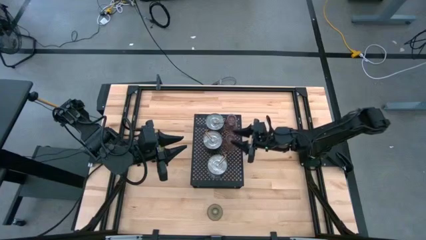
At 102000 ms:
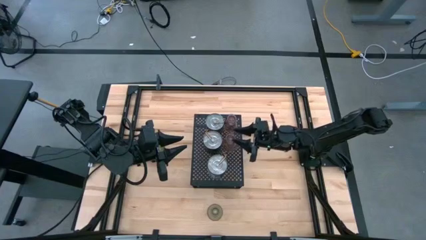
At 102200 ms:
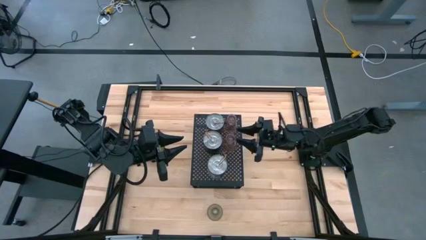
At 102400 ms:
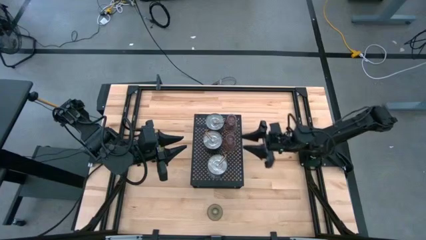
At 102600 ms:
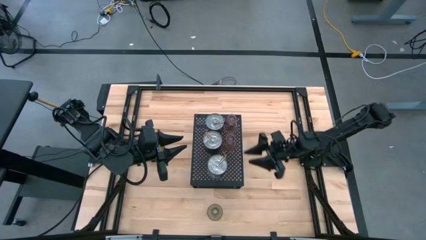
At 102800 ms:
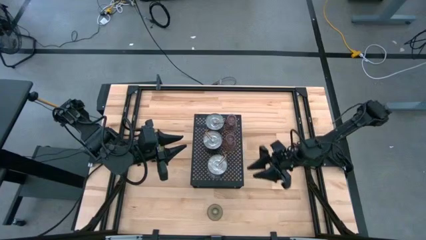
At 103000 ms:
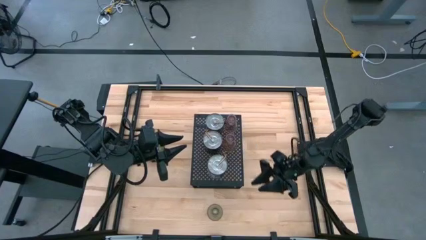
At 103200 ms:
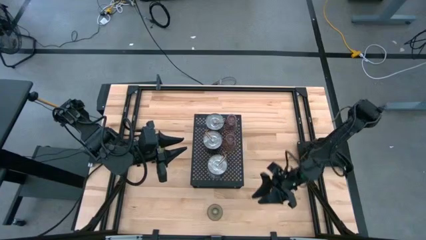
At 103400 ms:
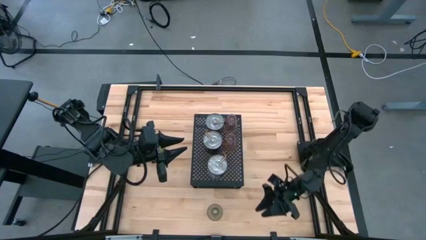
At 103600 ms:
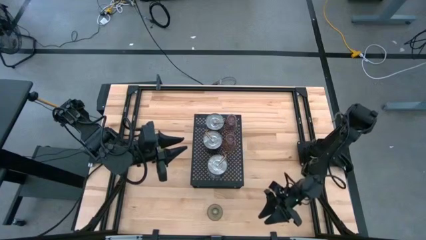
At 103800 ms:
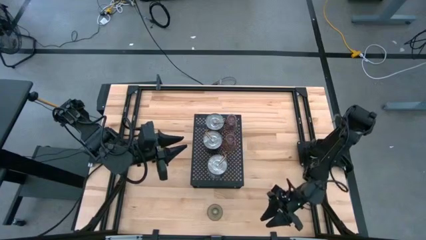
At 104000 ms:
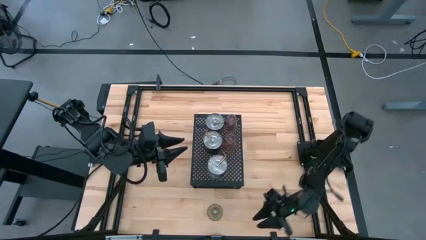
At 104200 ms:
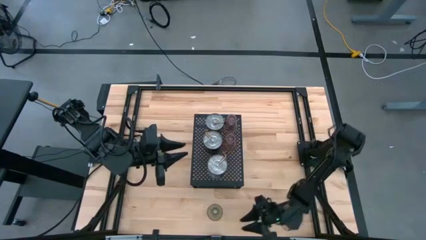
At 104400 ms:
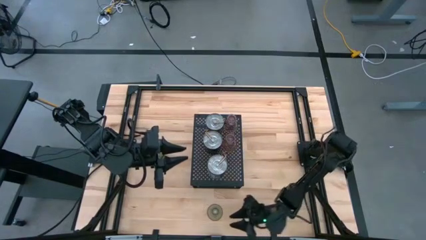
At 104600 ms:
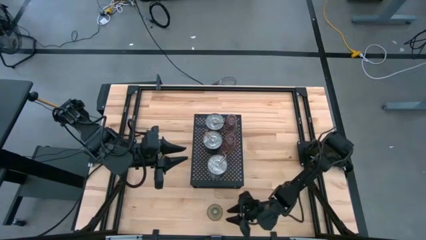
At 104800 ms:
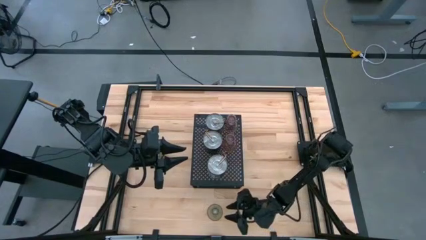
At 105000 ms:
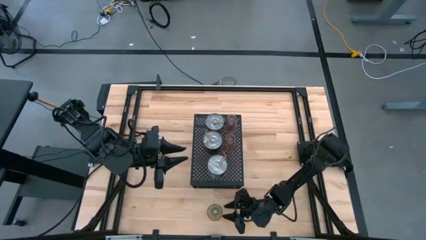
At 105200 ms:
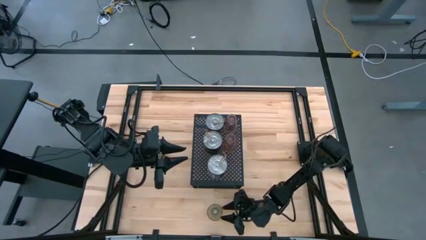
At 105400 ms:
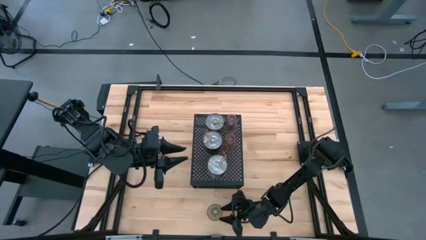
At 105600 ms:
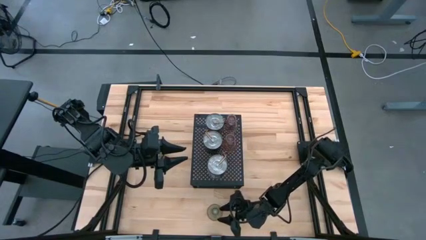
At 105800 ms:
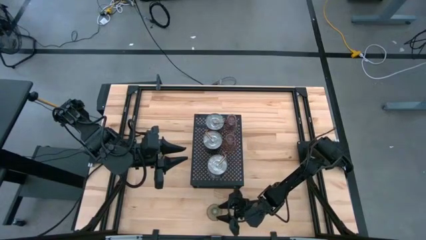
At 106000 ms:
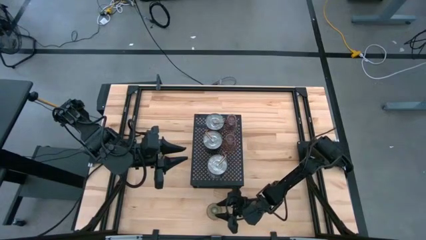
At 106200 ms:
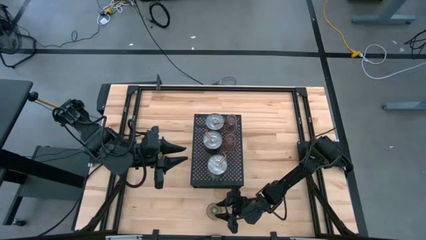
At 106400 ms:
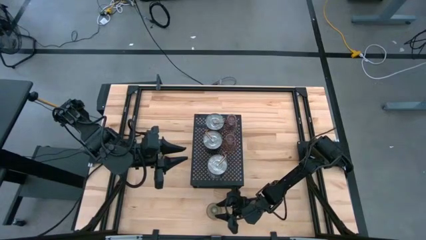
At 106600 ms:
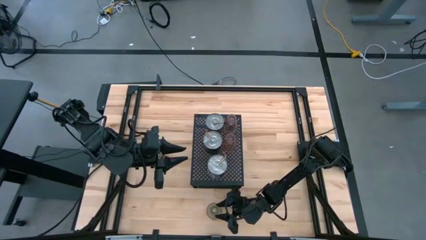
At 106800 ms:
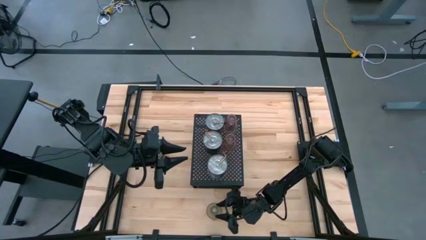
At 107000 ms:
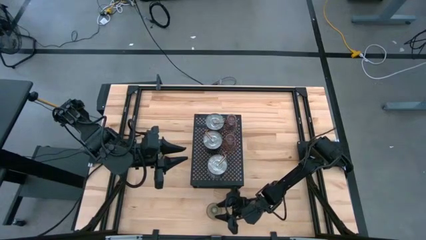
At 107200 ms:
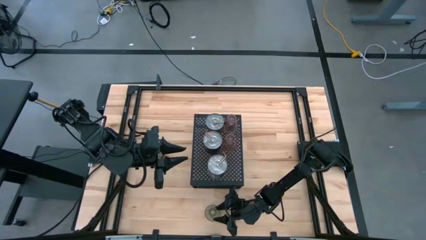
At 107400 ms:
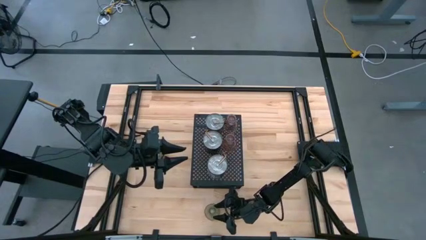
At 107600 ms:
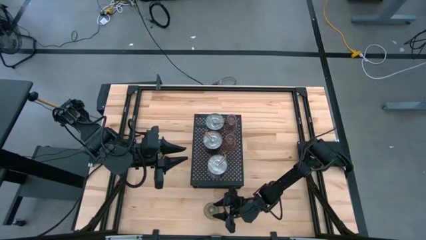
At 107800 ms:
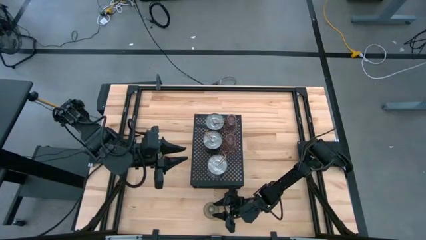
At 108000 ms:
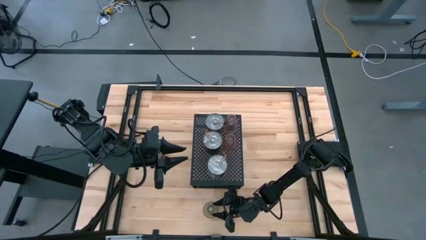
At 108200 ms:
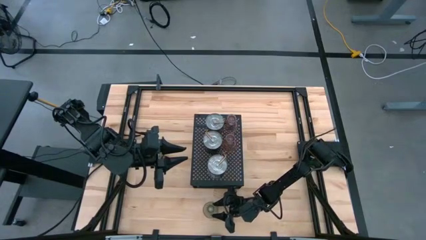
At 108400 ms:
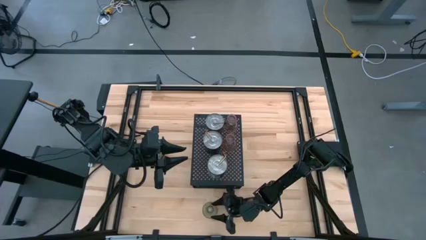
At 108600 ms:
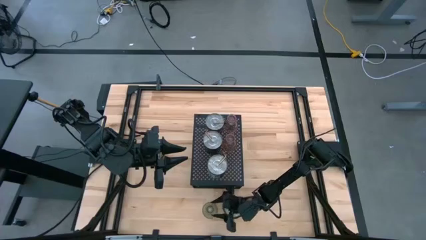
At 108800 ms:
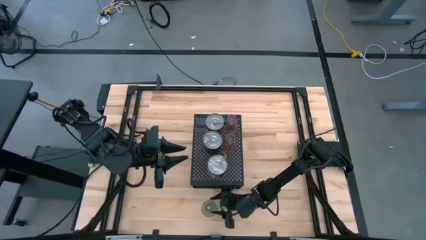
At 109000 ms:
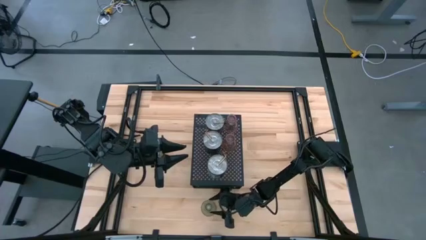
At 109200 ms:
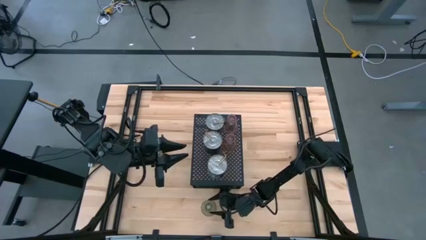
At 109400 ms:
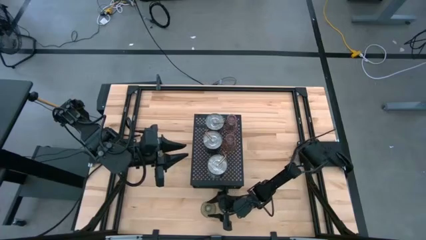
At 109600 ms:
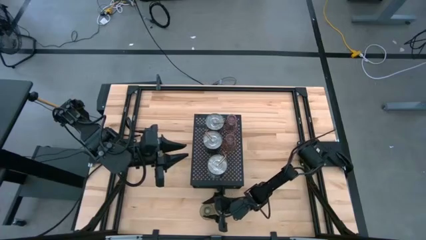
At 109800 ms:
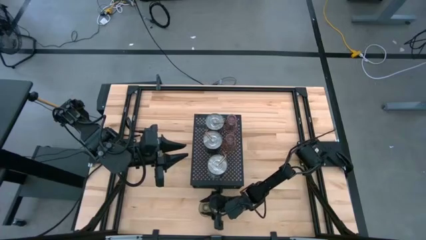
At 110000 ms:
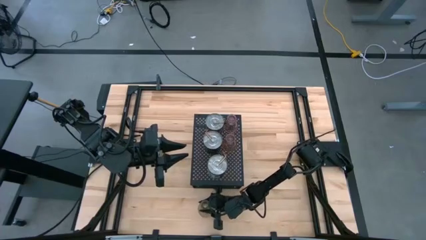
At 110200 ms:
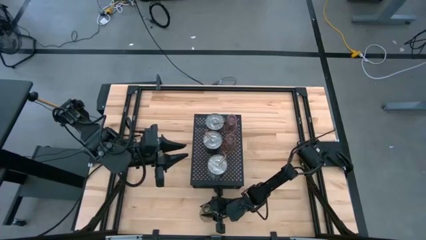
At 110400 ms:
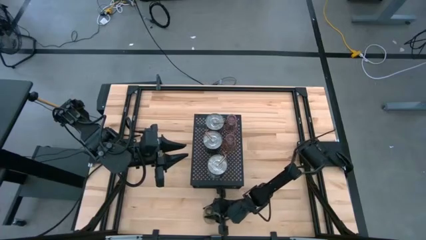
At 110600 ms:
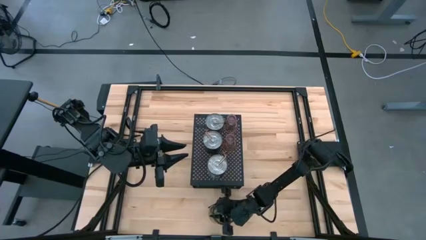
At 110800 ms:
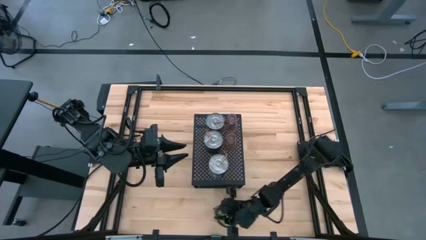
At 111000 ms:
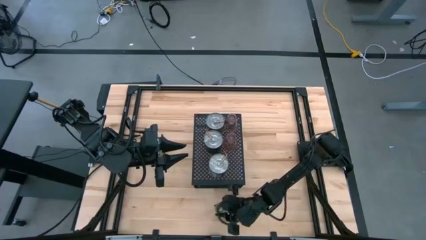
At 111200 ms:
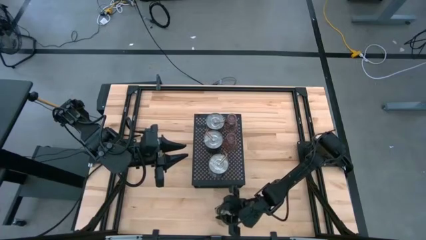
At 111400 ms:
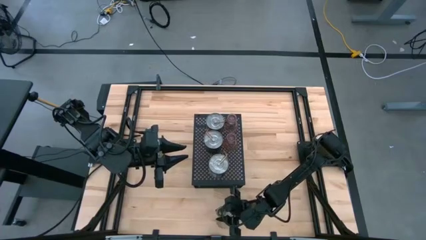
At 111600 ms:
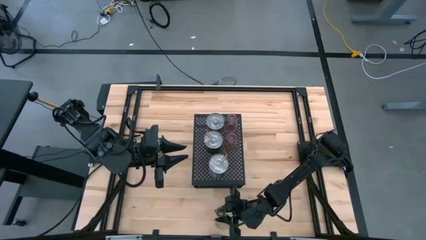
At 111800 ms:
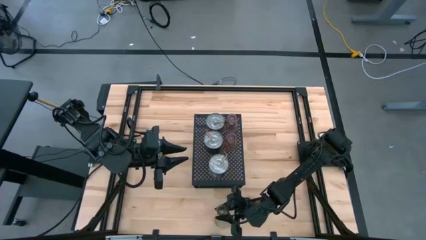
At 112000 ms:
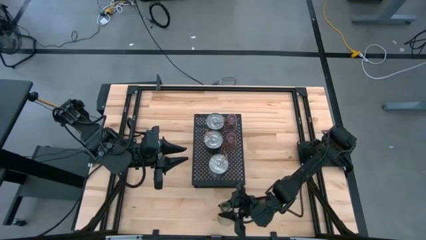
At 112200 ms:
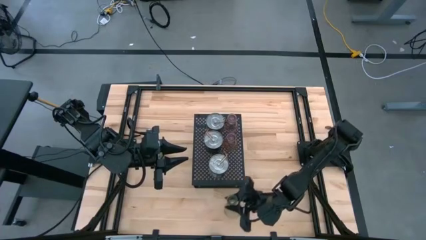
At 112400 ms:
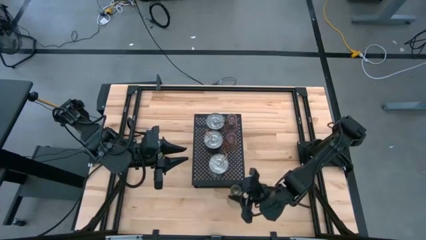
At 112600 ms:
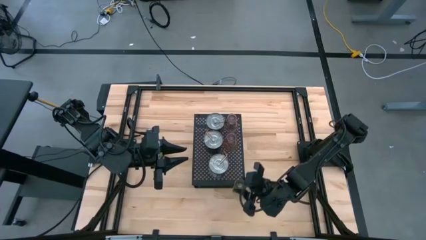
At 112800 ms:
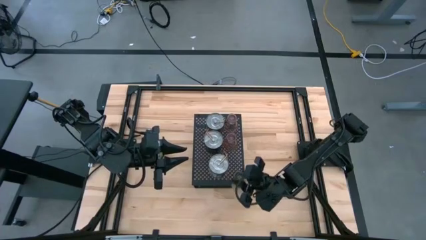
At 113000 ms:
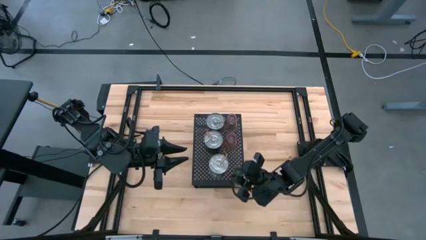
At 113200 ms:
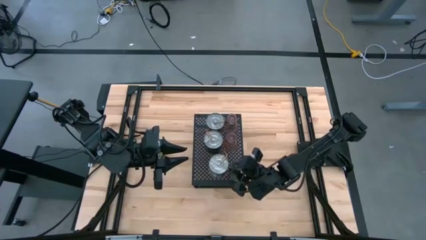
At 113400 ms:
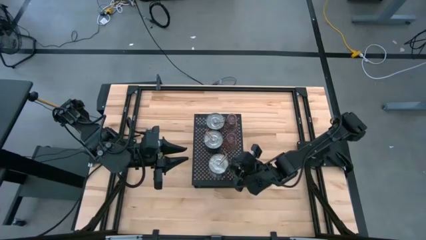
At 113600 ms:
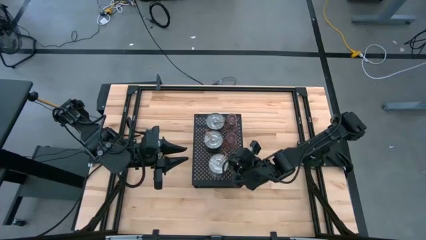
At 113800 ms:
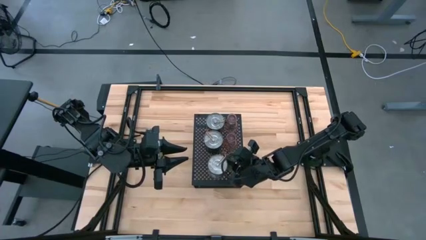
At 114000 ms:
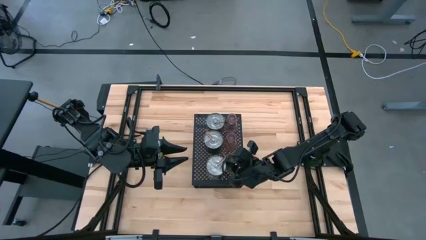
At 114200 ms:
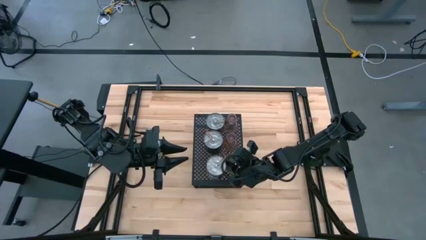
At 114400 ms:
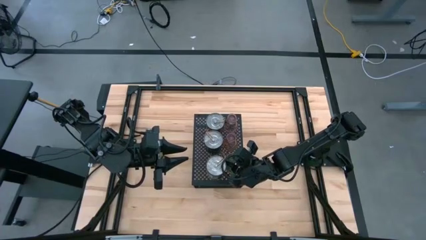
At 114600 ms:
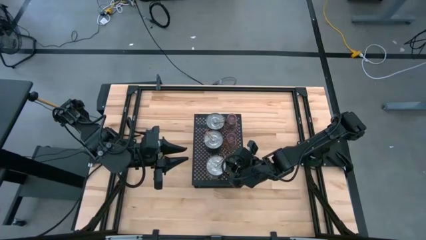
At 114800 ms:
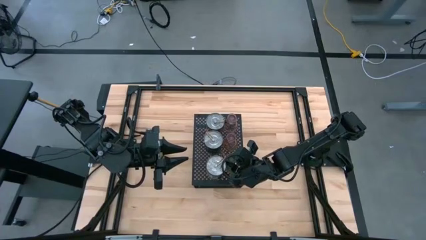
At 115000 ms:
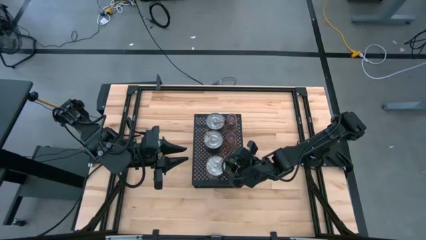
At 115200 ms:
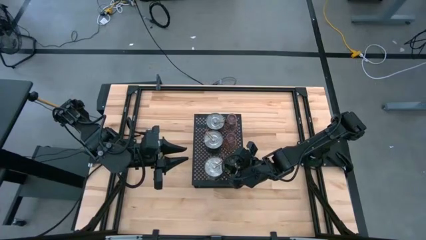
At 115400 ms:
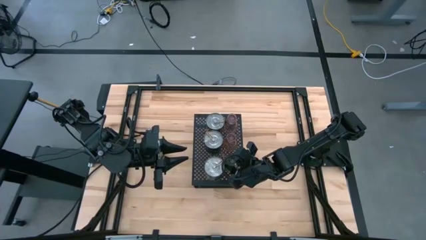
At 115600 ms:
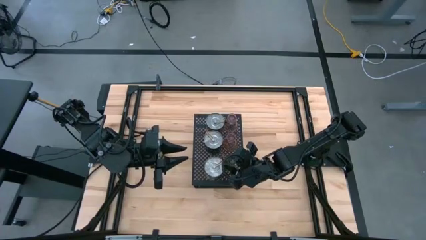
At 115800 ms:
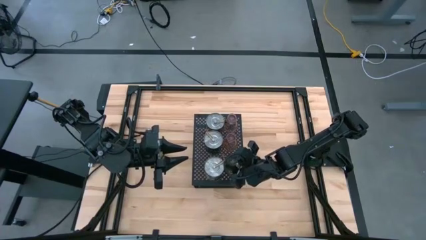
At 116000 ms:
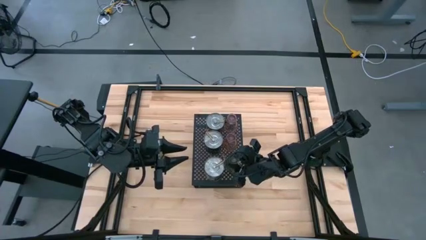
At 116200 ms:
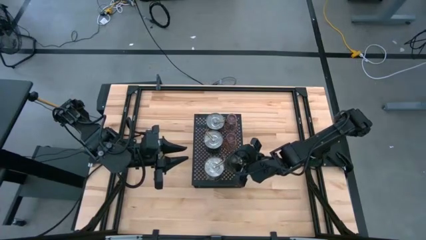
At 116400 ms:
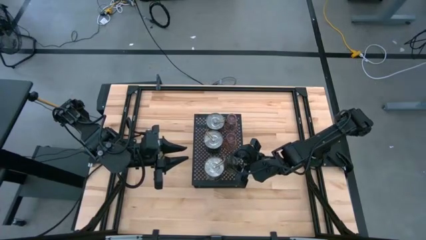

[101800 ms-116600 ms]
Task: Pick & Place candle stick holders
Put the green glass candle holder on the shelf aligned with the green glass candle holder

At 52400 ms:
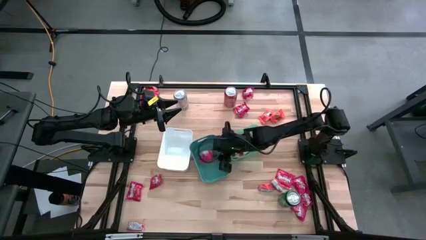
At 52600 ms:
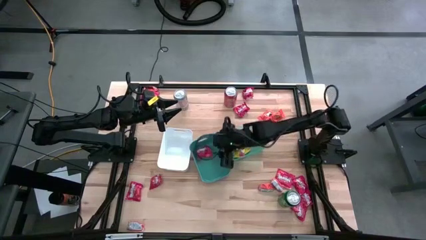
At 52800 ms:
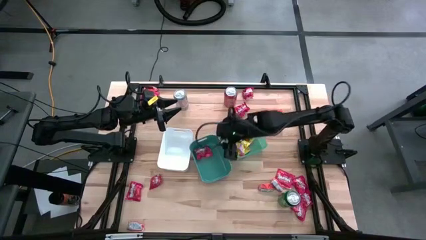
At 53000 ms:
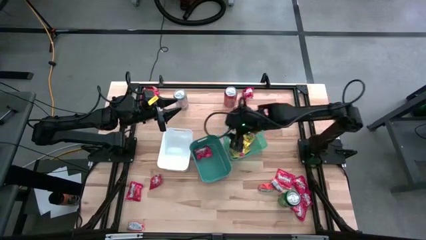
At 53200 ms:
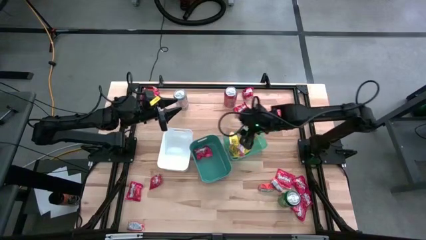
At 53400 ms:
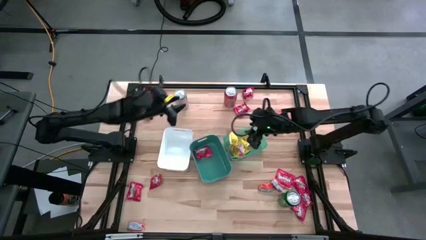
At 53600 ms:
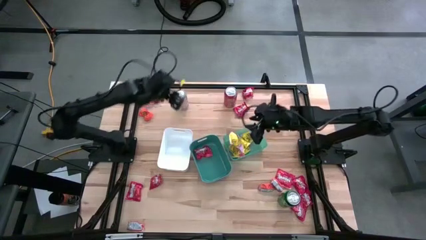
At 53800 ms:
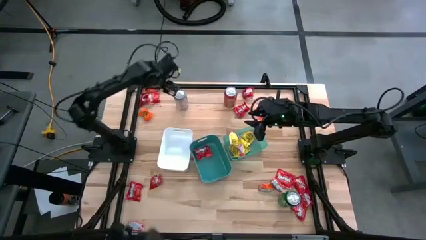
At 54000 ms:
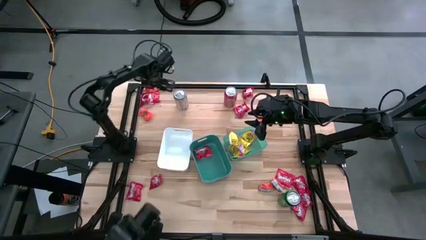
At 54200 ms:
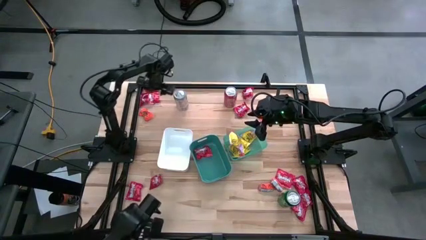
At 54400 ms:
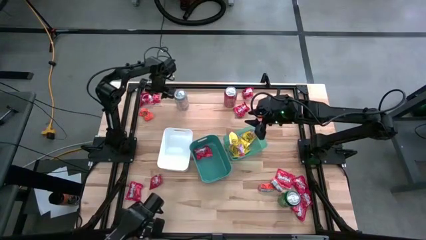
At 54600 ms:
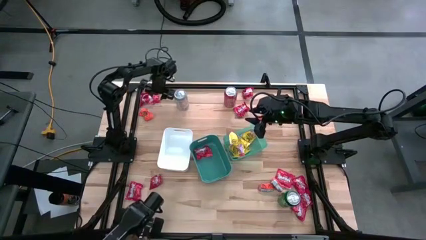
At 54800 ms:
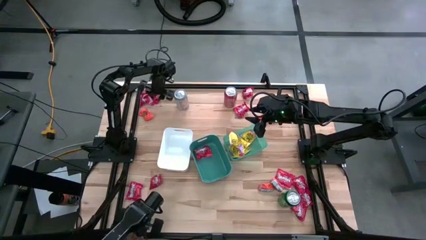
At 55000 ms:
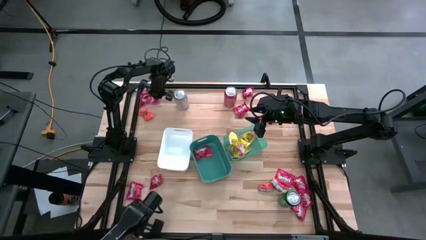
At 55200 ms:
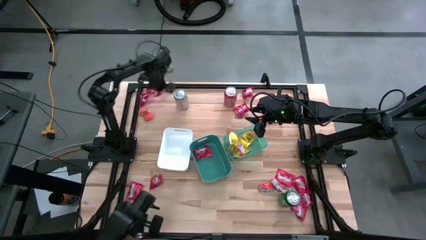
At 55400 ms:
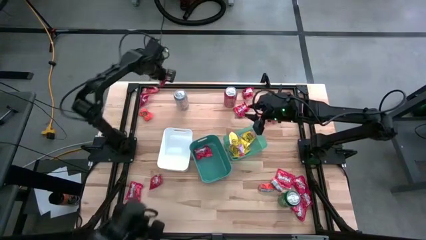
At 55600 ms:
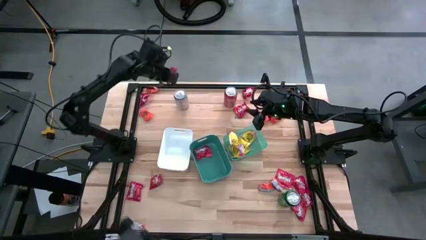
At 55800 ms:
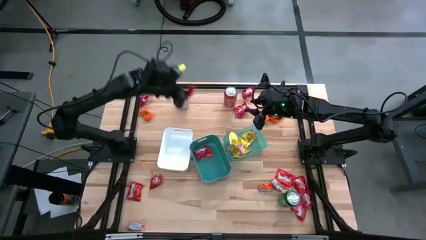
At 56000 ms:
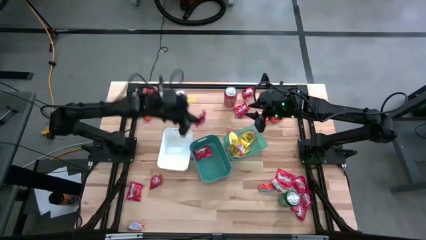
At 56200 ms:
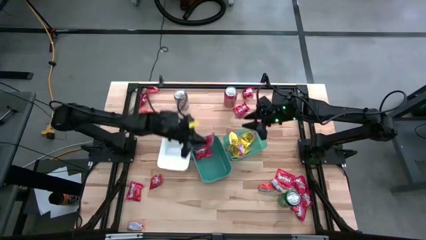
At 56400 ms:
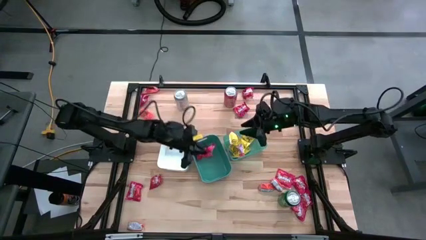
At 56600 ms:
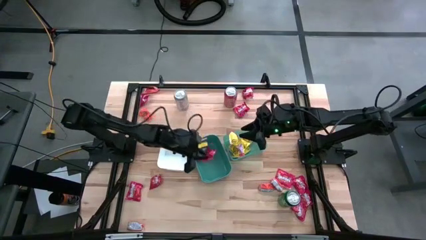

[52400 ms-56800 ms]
Task: Sort candy
Put the red candy into the green bin
